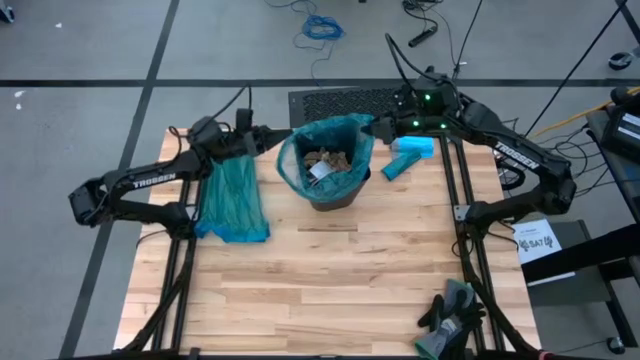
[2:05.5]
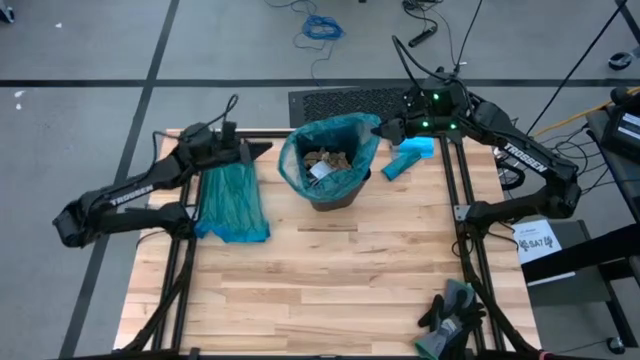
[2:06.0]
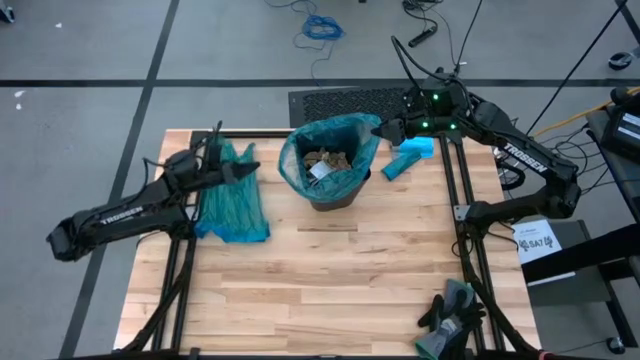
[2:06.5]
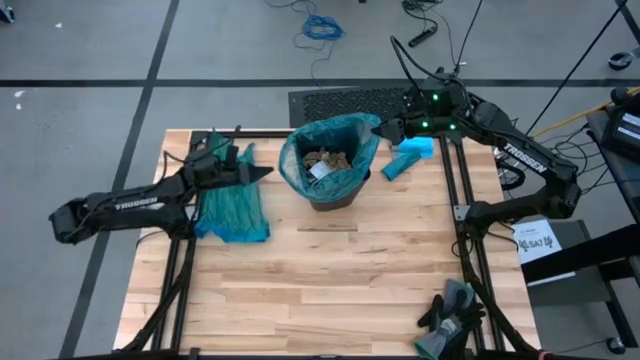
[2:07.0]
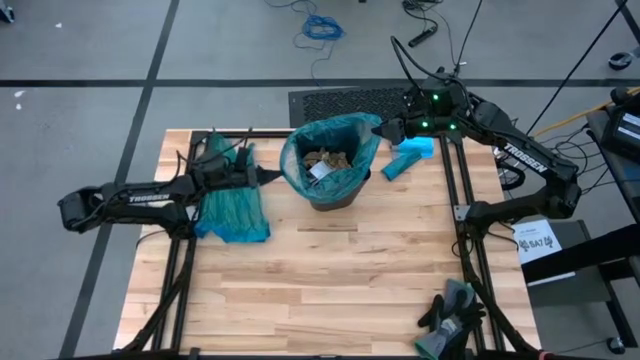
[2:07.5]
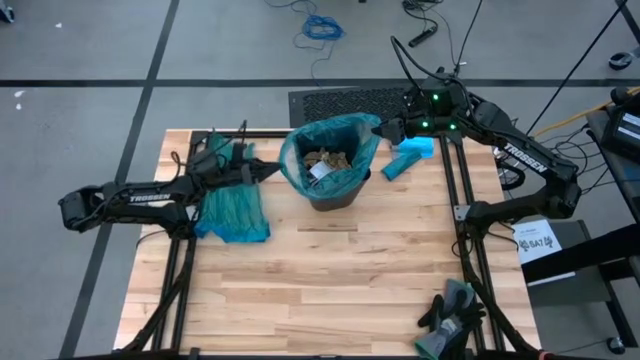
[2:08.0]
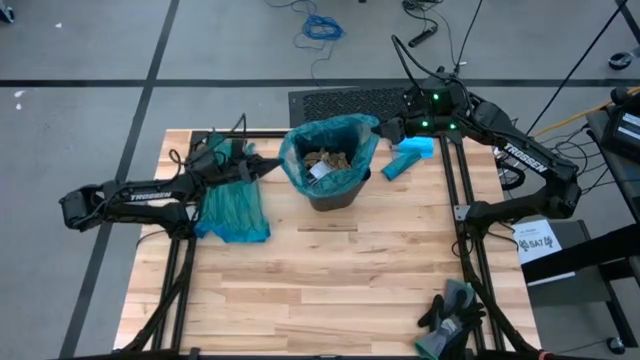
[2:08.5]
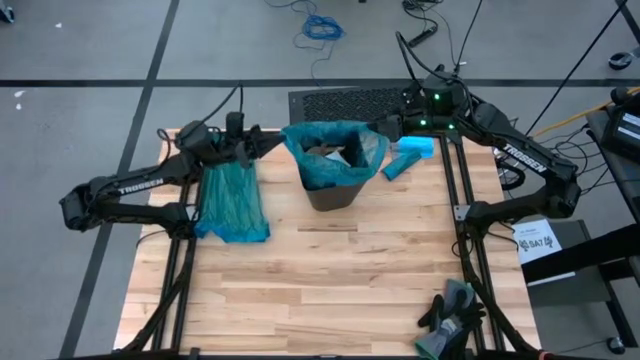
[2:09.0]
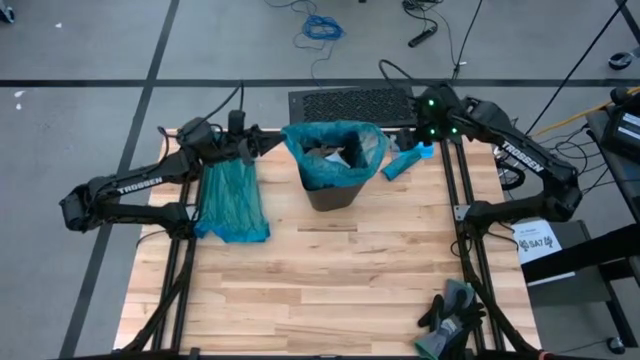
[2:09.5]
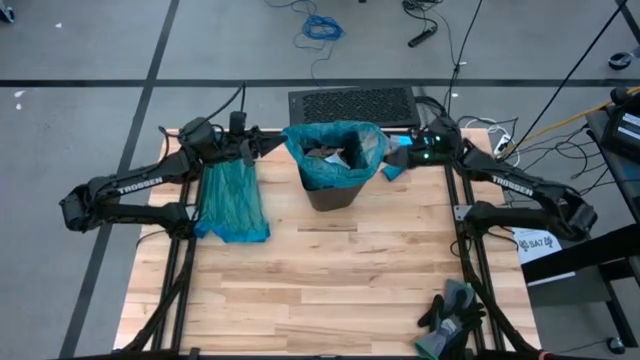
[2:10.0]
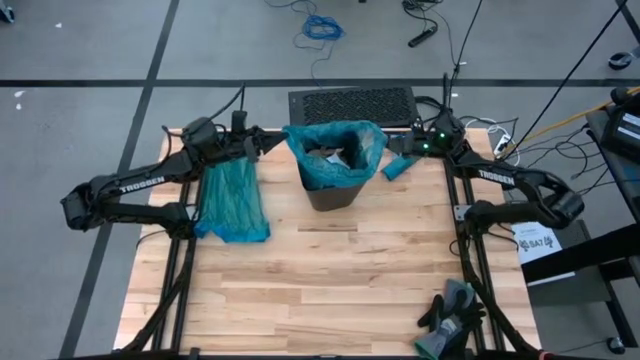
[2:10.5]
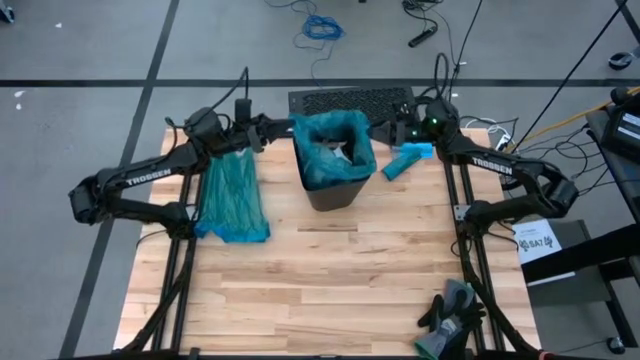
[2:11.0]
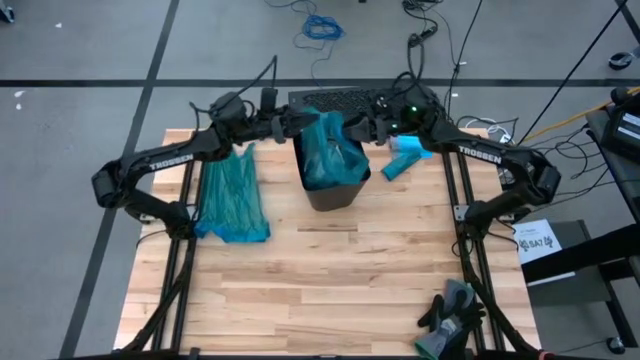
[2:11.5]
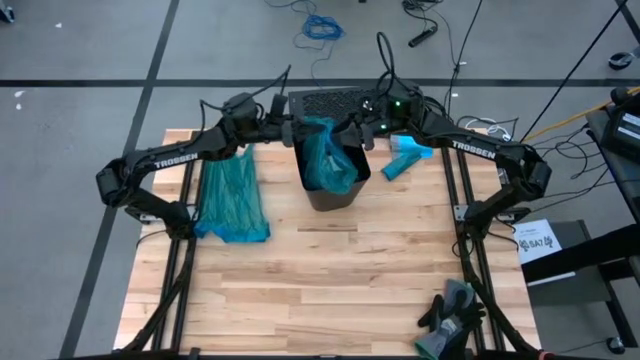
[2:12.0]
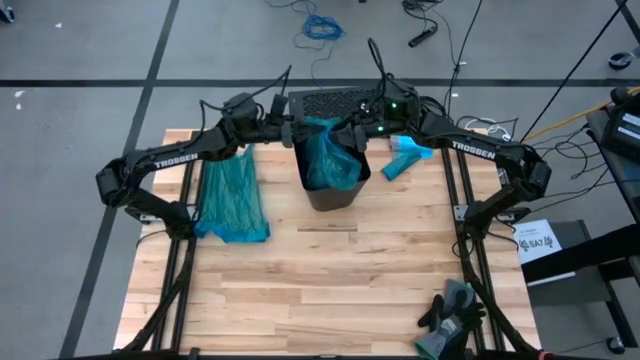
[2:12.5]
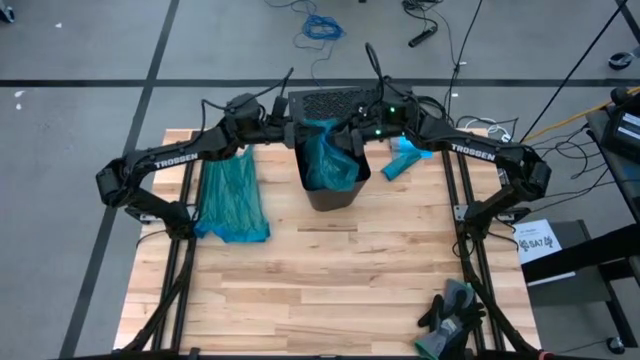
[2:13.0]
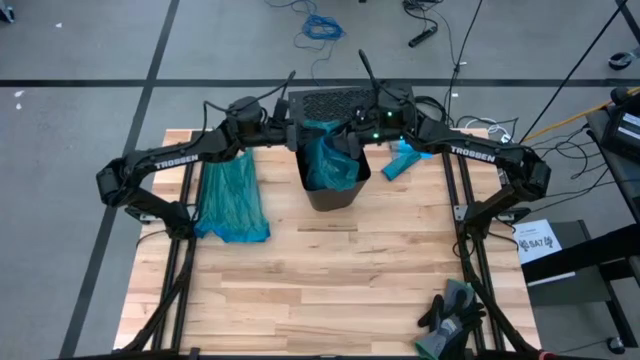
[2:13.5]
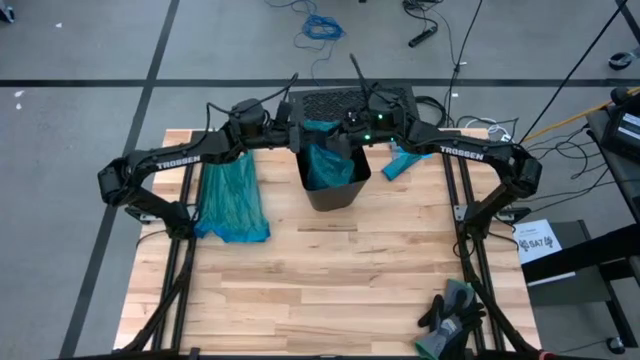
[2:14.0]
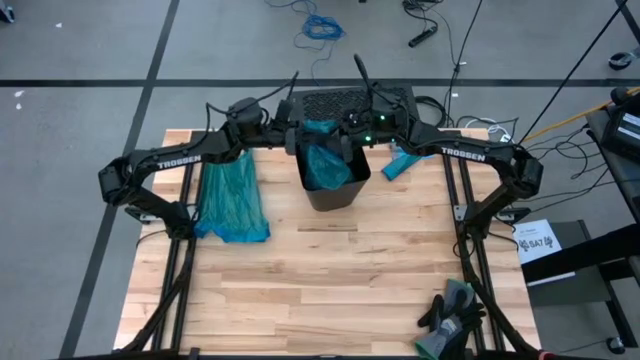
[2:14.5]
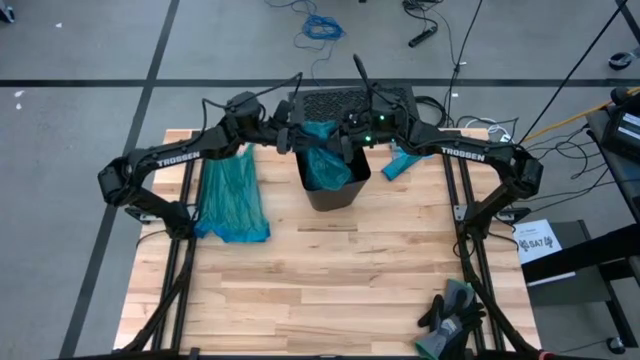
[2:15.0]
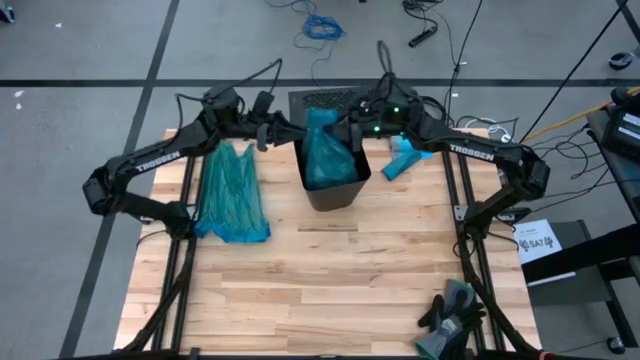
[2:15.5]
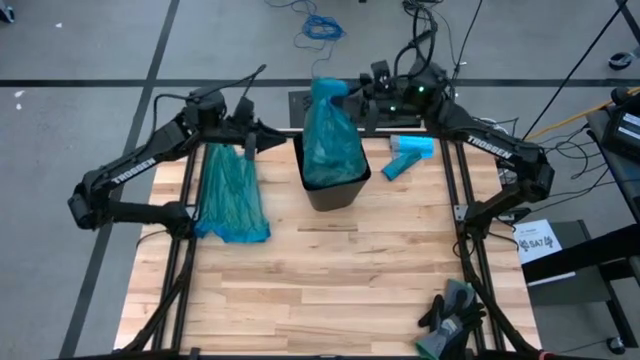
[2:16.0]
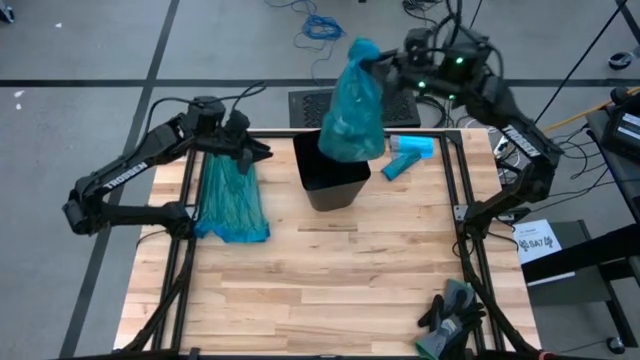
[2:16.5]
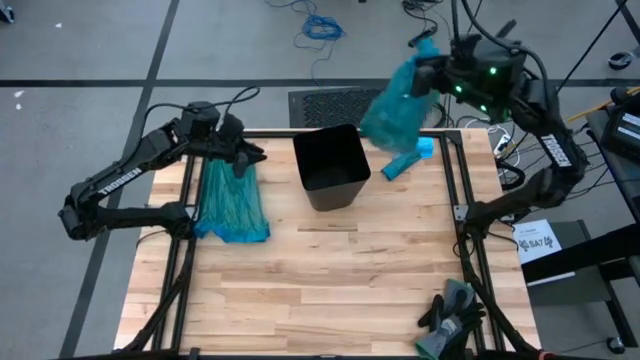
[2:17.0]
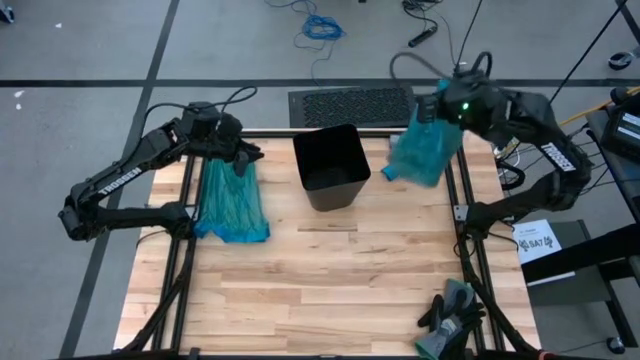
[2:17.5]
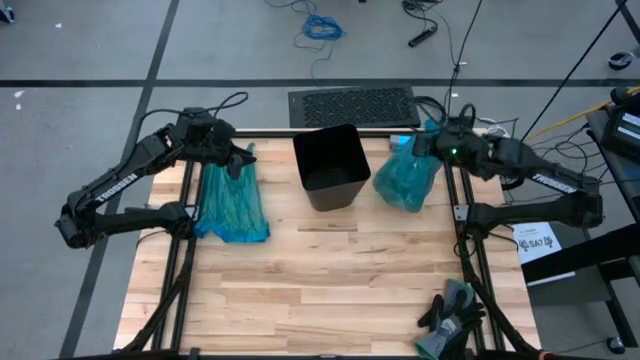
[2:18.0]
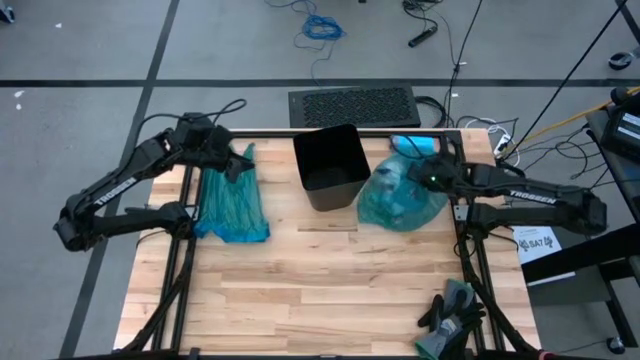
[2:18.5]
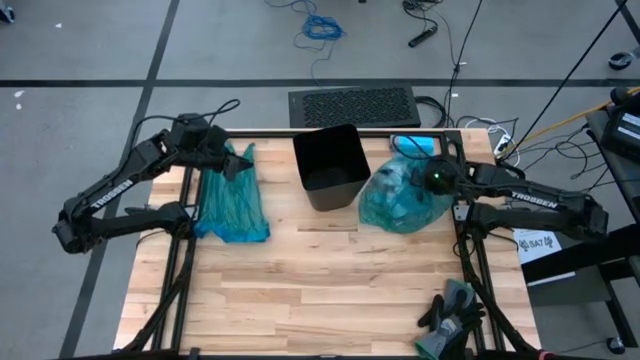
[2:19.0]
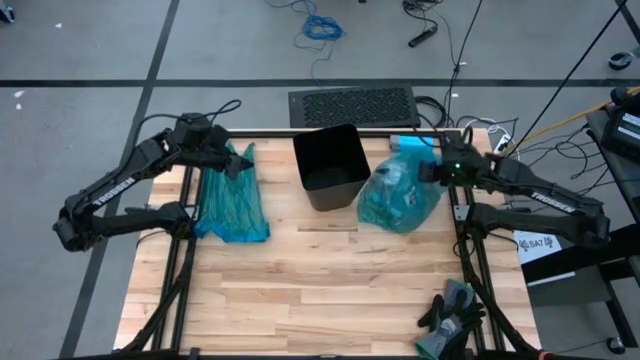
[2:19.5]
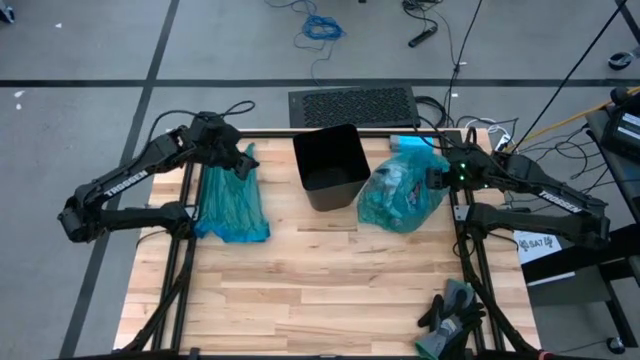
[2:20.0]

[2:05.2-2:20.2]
Task: place trash/remove bag and relplace
Remove the blue trash bag from the black trash bin

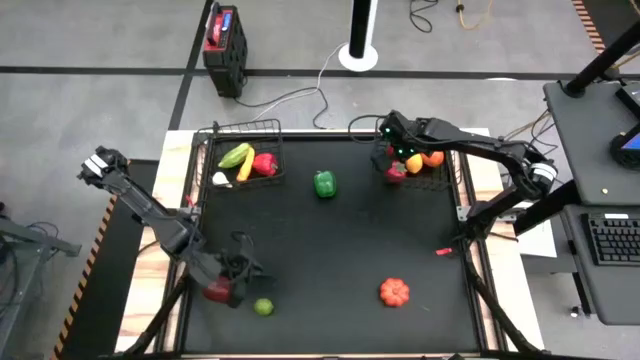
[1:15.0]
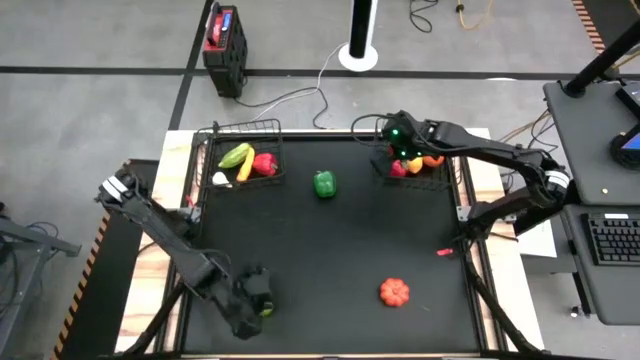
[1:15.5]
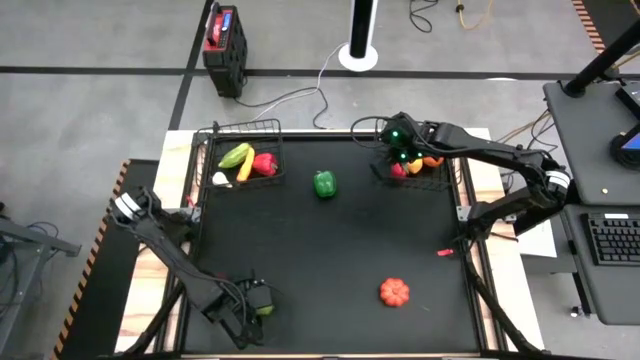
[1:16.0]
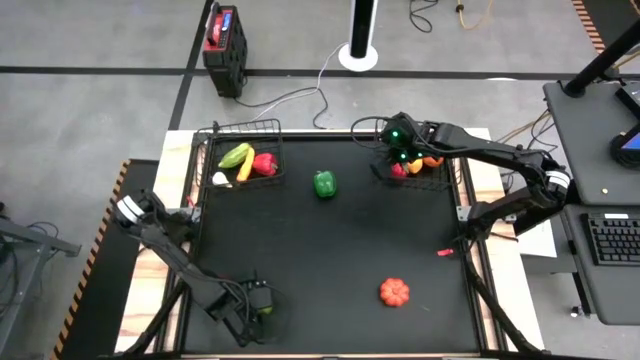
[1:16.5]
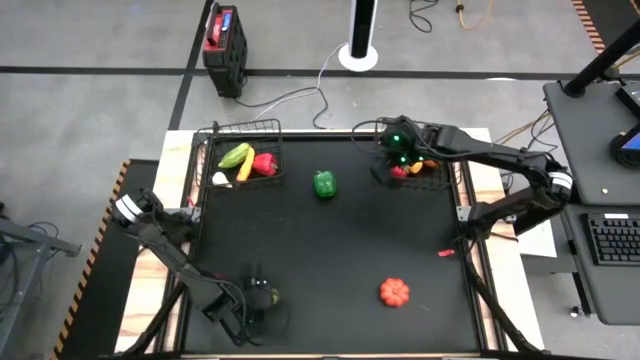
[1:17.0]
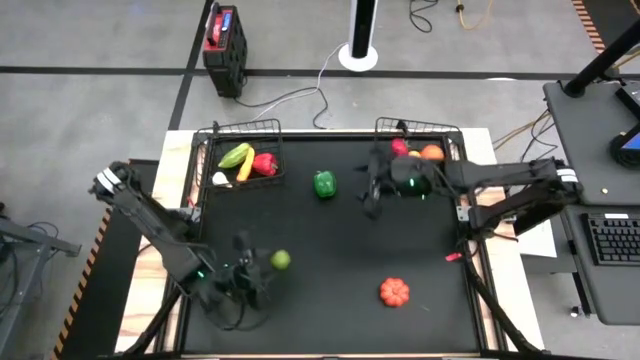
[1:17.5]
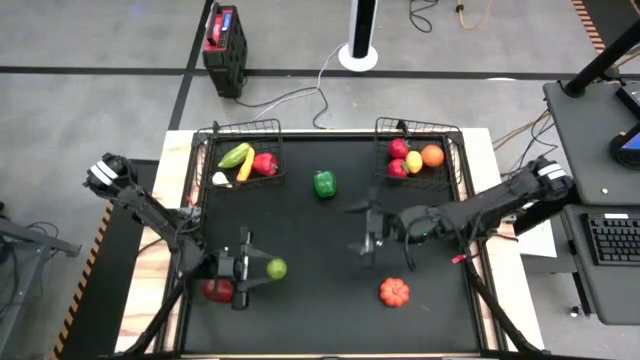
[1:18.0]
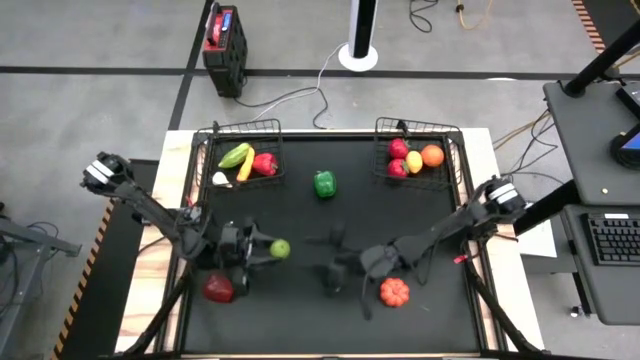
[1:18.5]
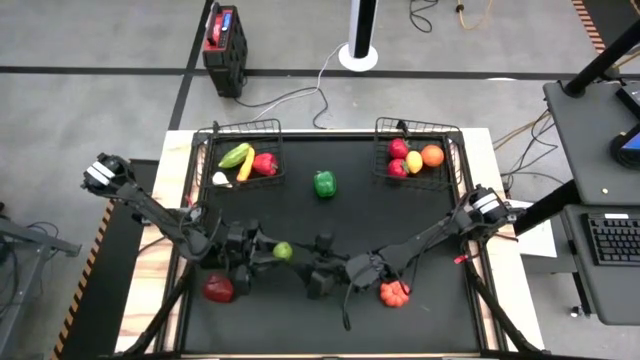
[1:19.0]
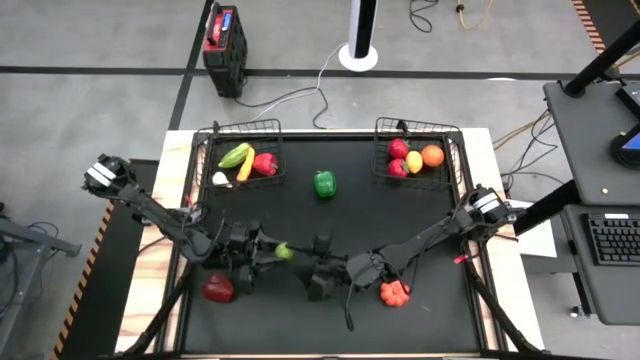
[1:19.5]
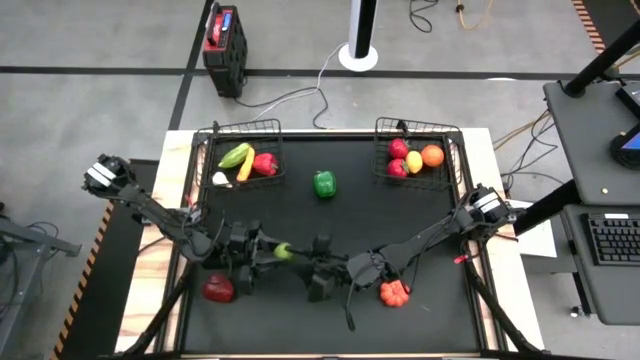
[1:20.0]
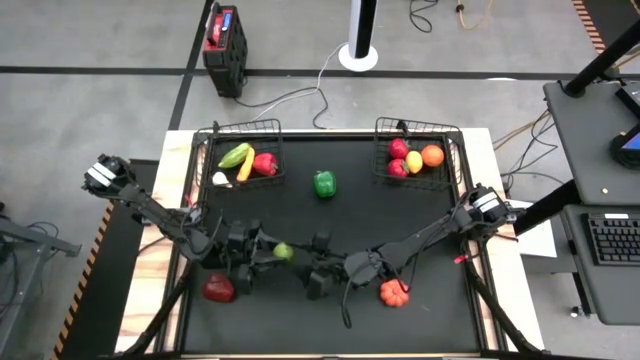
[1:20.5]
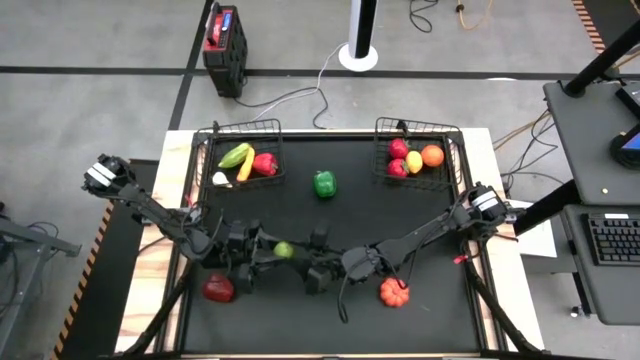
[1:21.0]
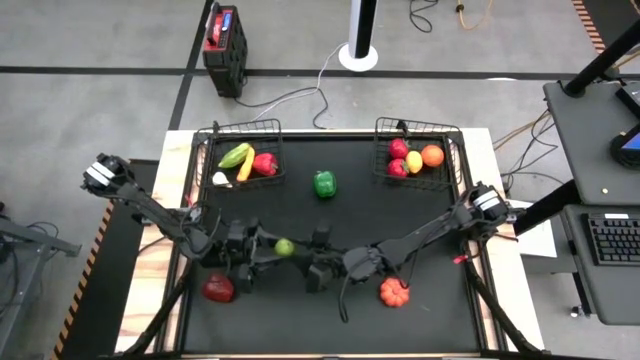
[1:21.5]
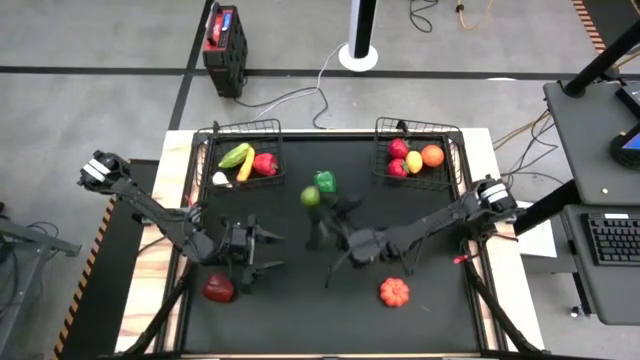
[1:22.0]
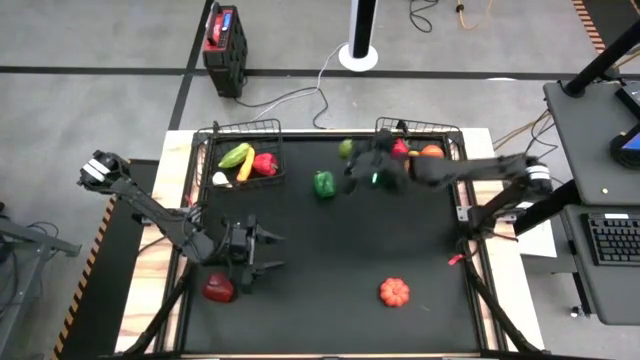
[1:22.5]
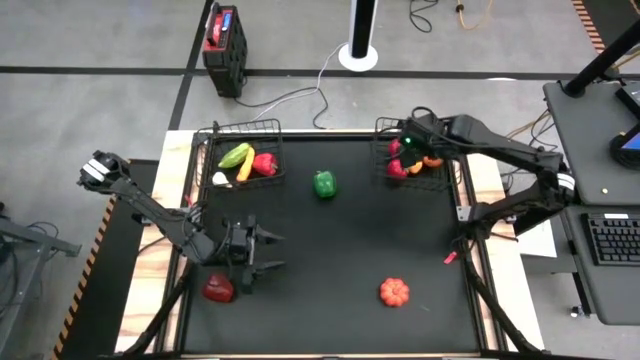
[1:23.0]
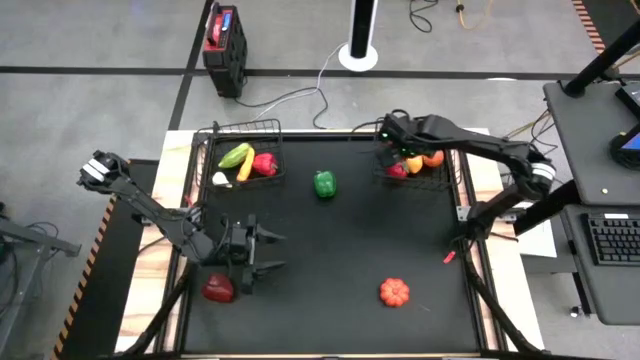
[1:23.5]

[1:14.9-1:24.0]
Task: Sort produce into baskets
Put the lime into the right wire basket
